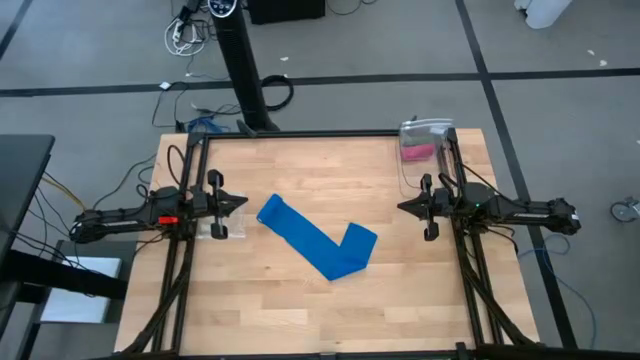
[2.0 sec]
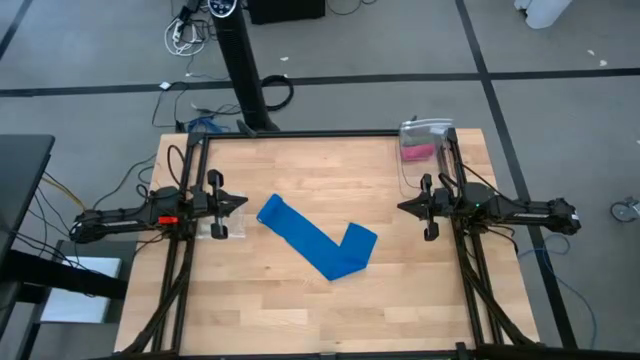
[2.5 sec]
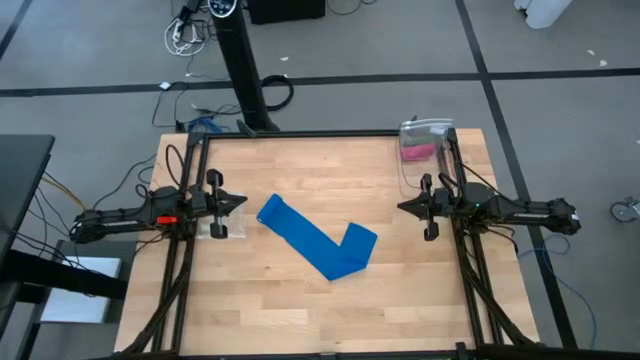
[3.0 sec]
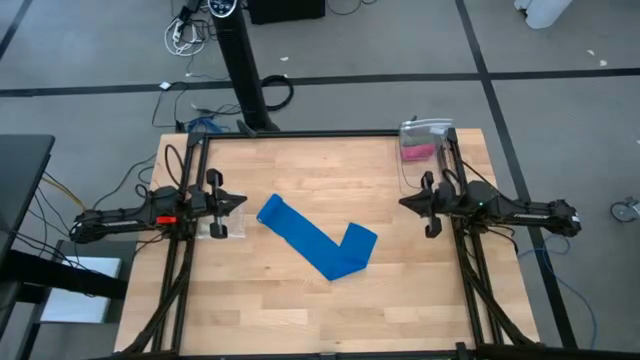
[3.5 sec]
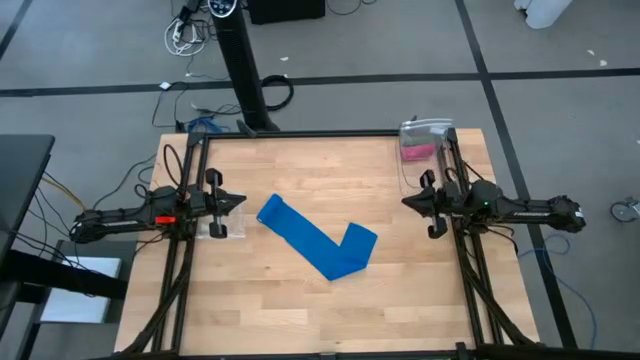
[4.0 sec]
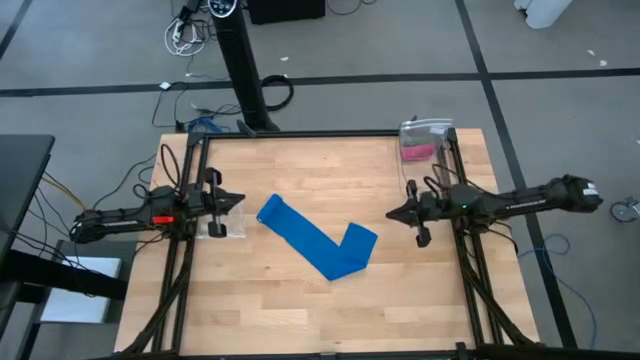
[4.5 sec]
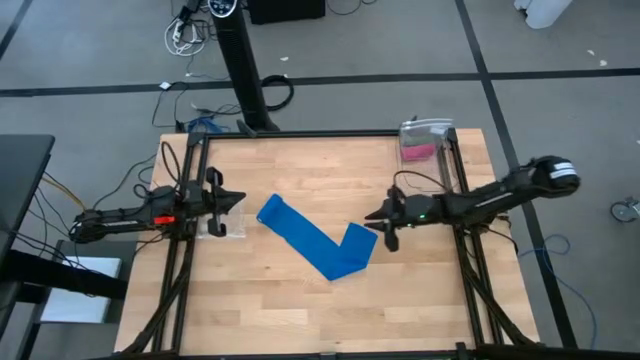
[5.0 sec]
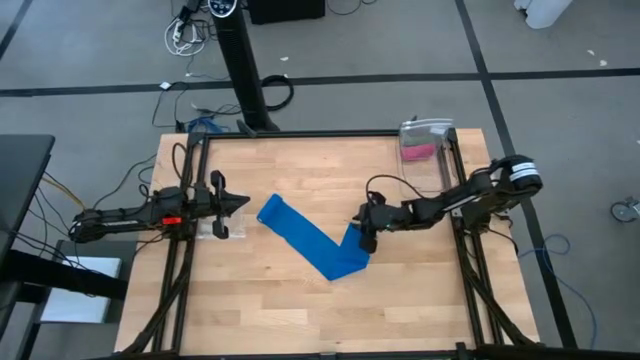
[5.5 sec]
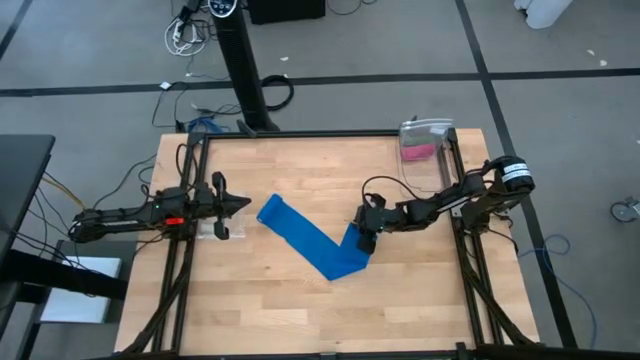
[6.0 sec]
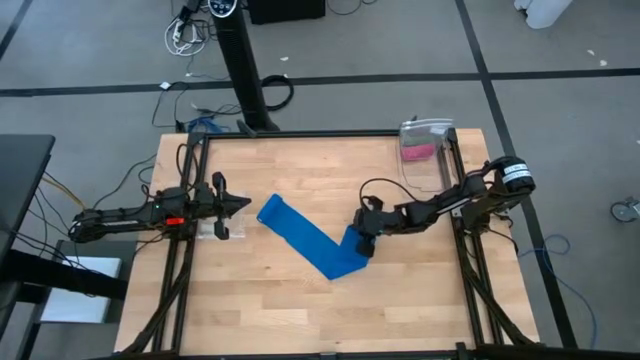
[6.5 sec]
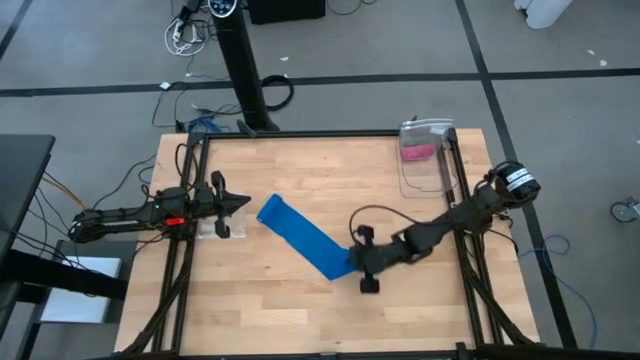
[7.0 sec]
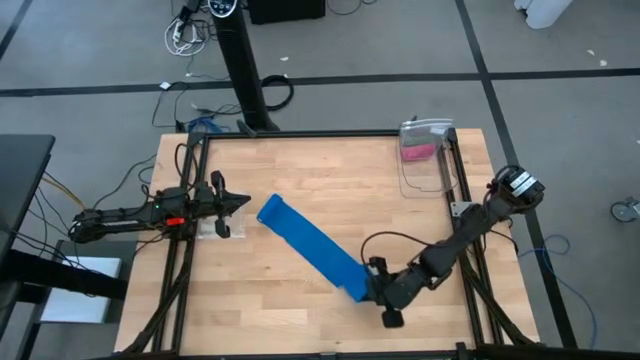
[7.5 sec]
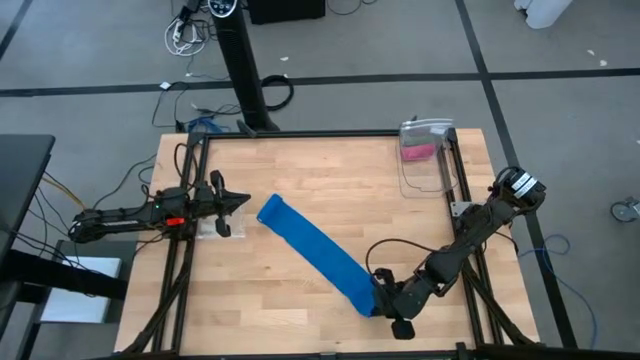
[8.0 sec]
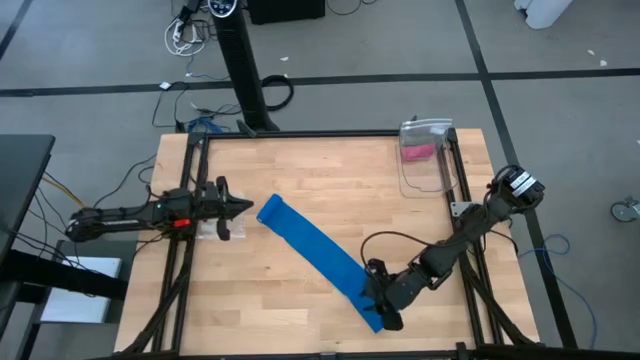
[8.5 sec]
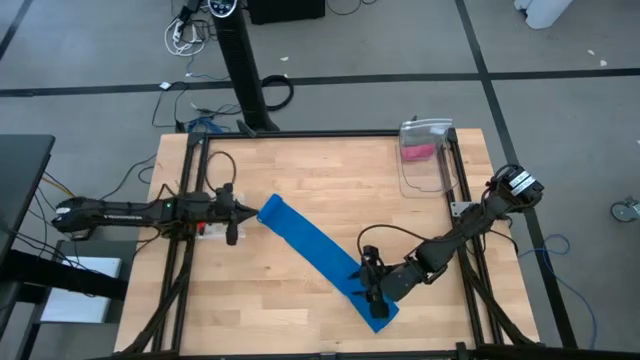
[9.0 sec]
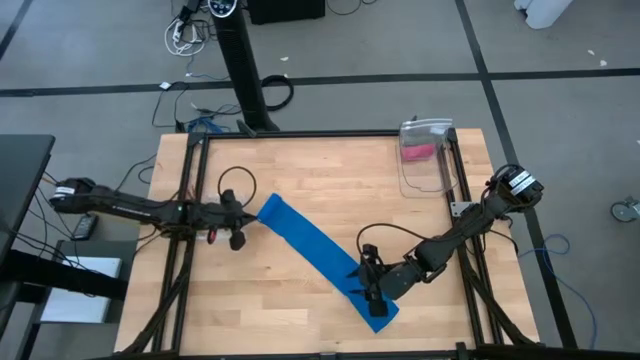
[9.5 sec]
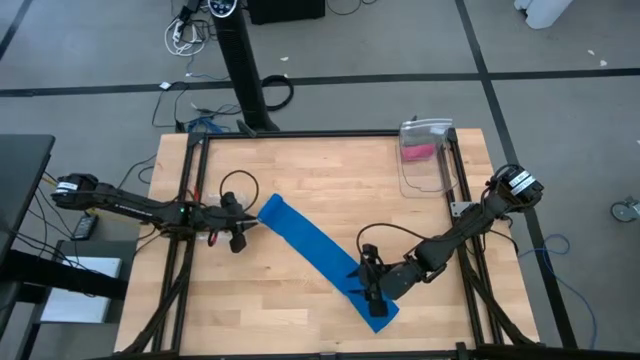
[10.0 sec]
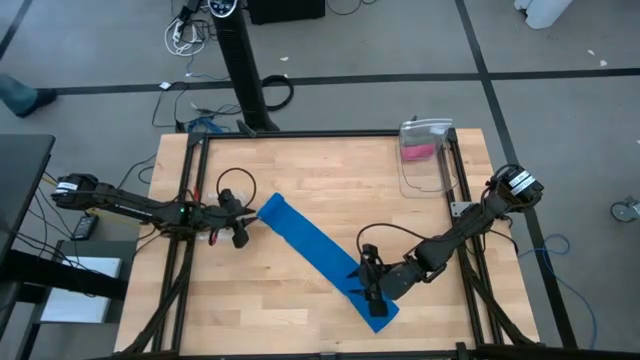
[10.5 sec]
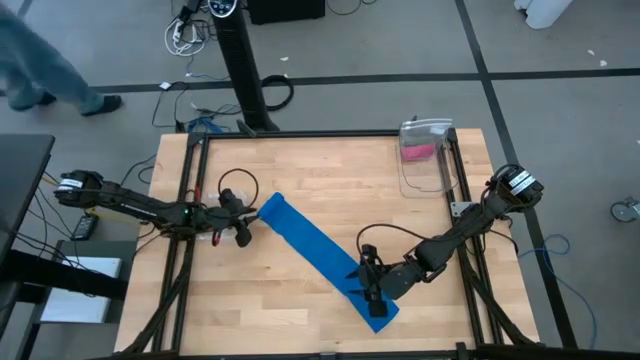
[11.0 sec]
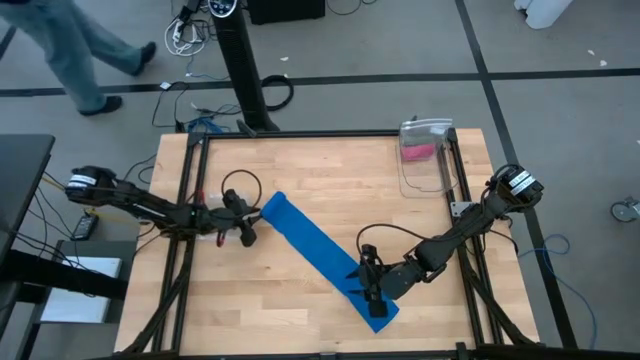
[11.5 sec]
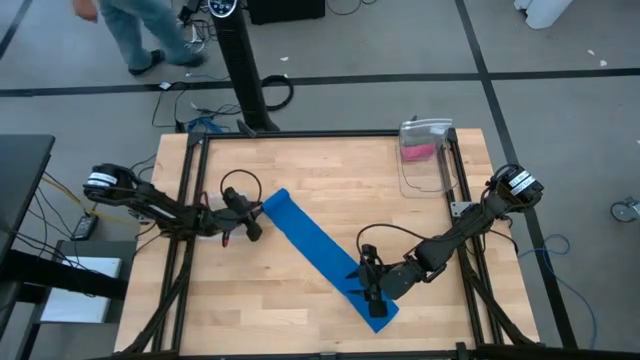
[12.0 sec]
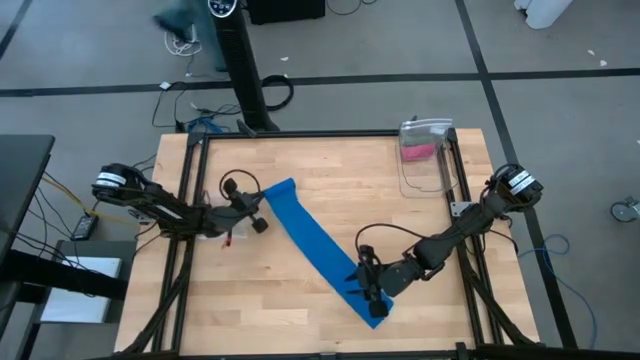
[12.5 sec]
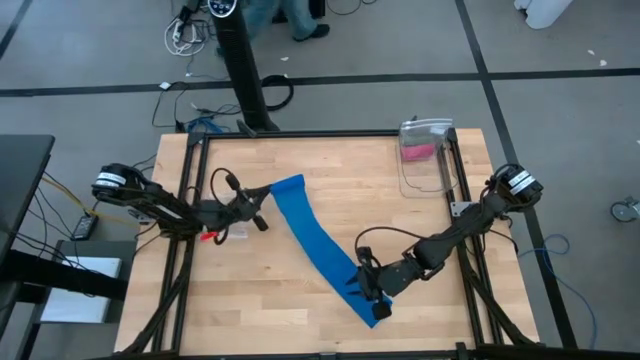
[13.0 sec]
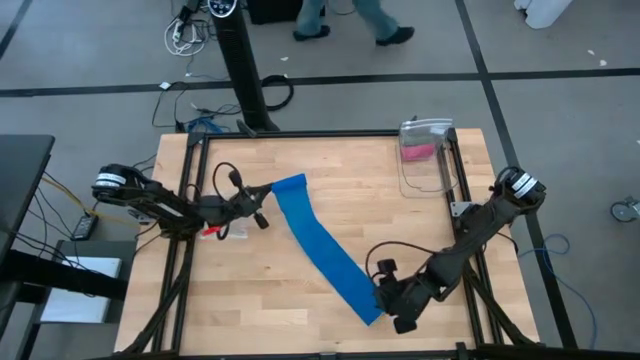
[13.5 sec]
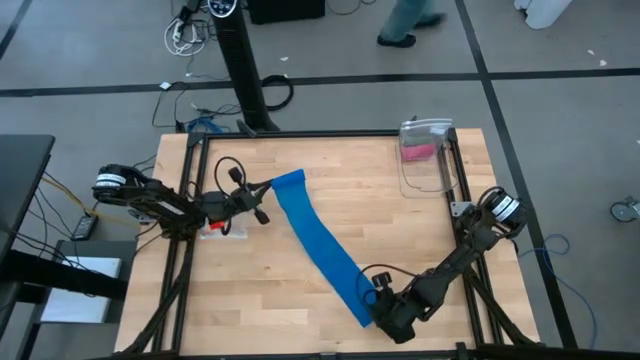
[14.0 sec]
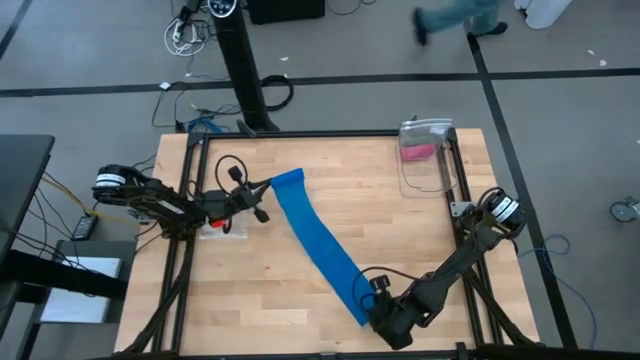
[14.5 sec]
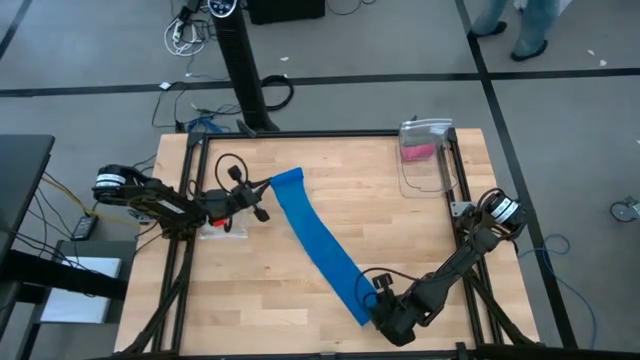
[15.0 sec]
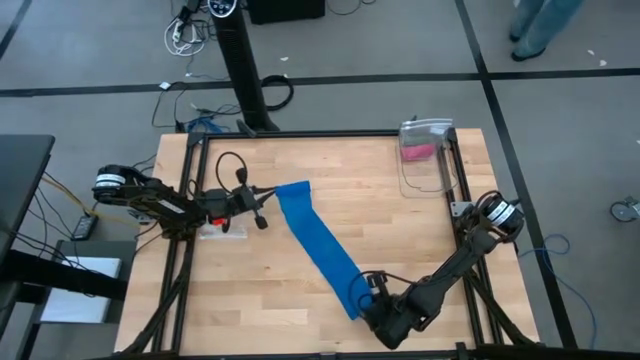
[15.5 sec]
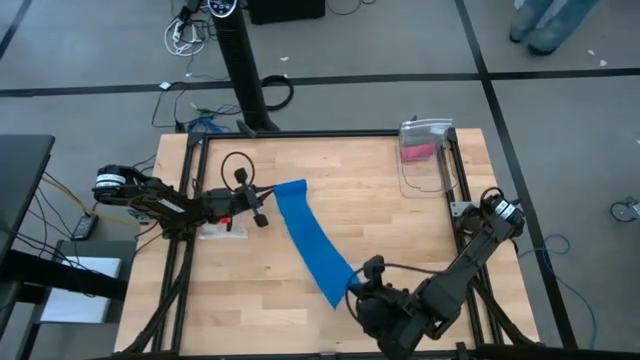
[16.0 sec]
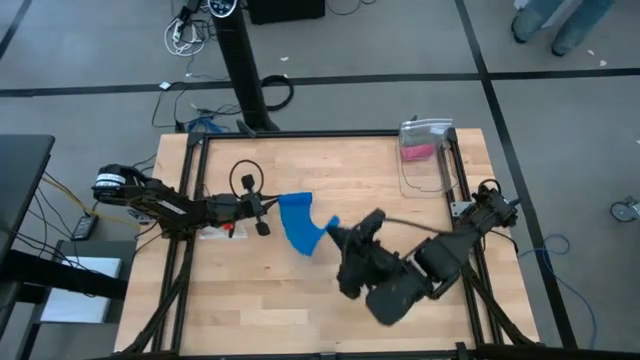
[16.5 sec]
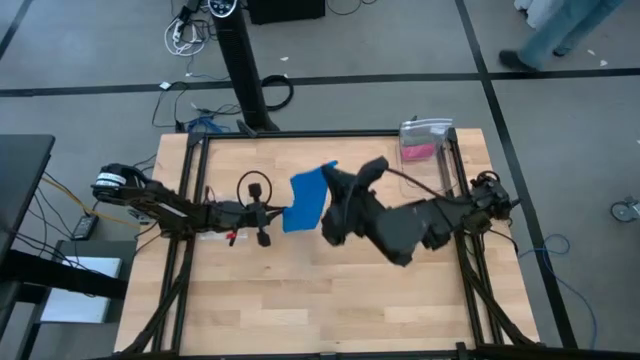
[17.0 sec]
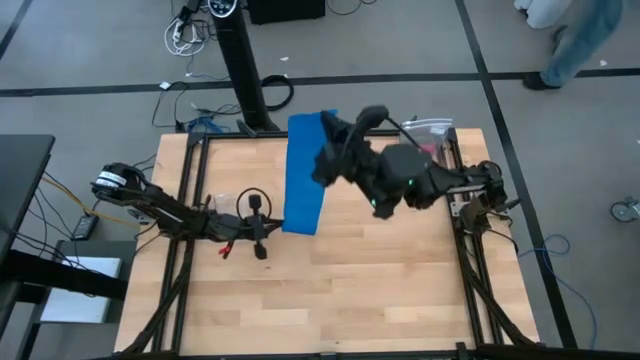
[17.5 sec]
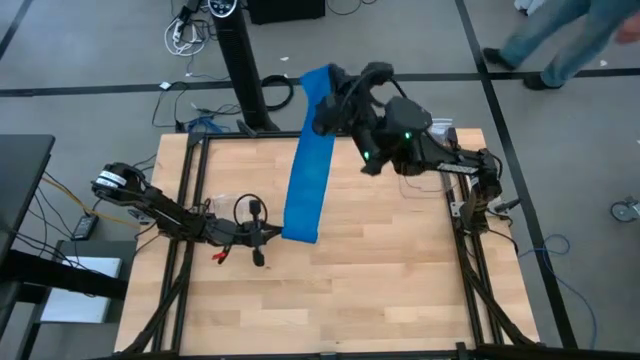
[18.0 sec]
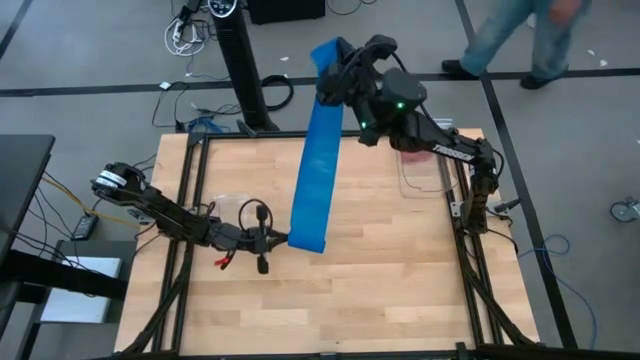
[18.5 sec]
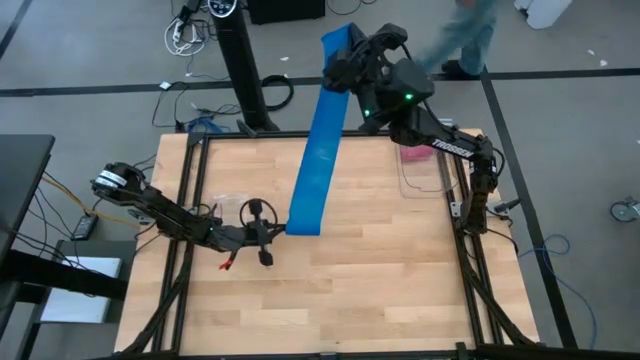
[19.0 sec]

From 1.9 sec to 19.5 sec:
Task: Roll bandage
Roll the blue bandage
